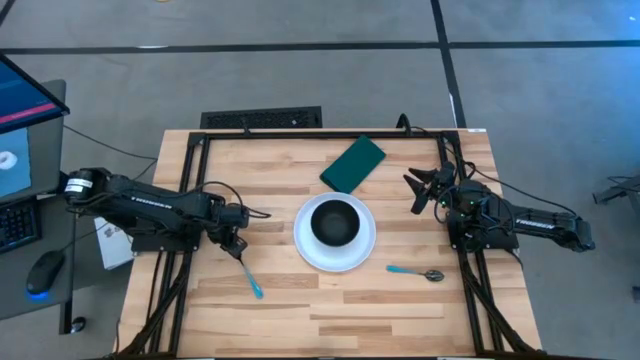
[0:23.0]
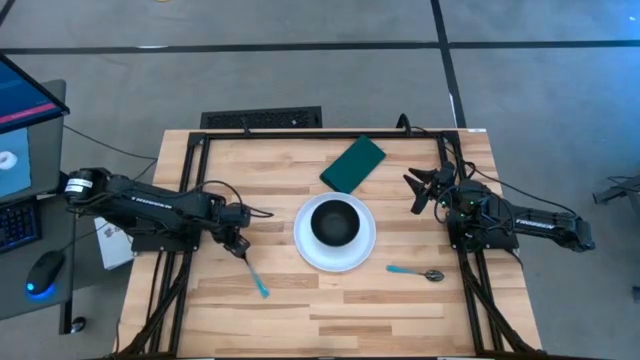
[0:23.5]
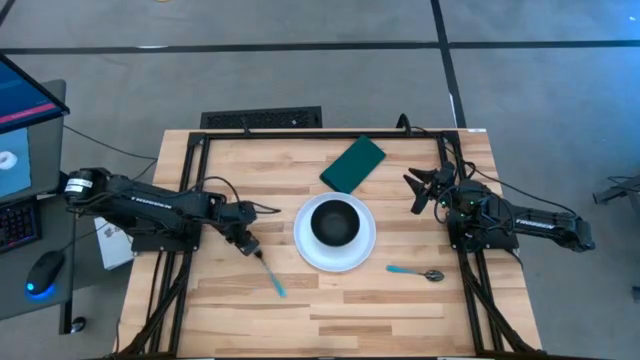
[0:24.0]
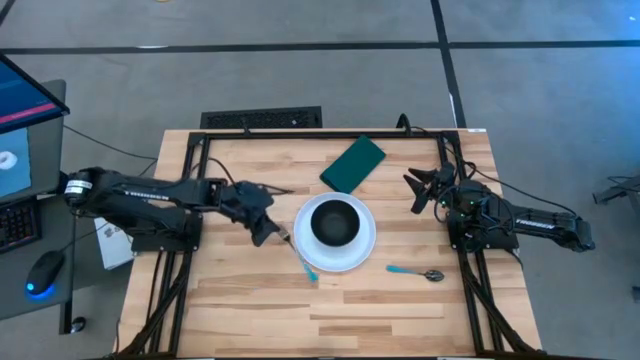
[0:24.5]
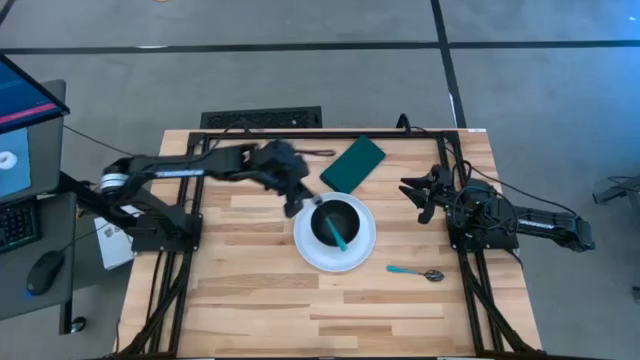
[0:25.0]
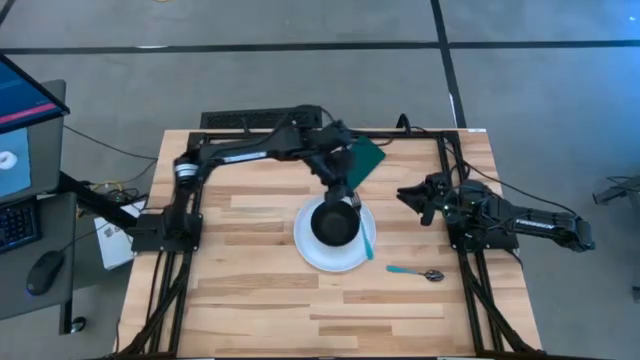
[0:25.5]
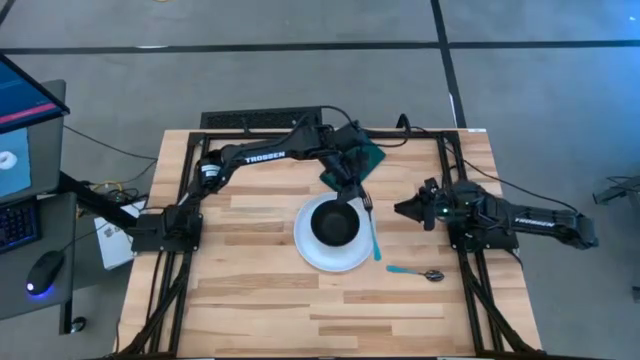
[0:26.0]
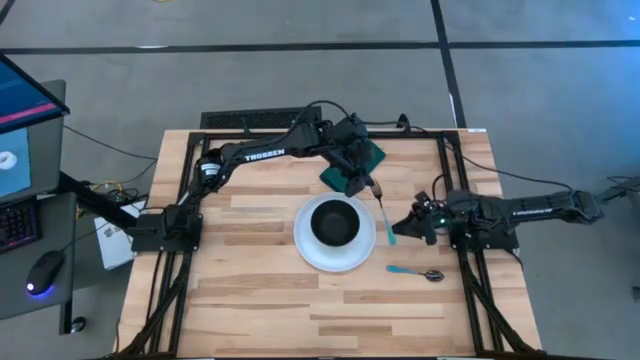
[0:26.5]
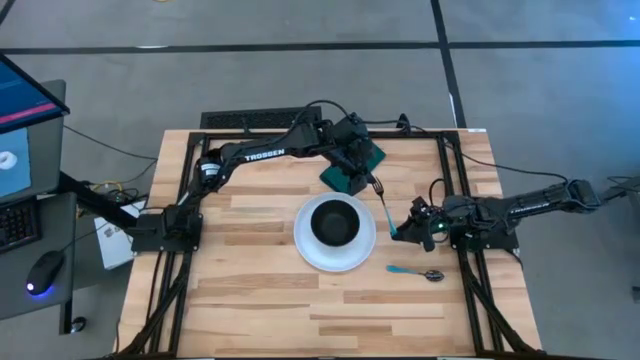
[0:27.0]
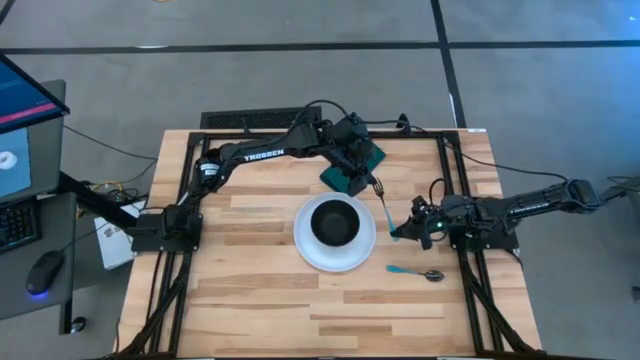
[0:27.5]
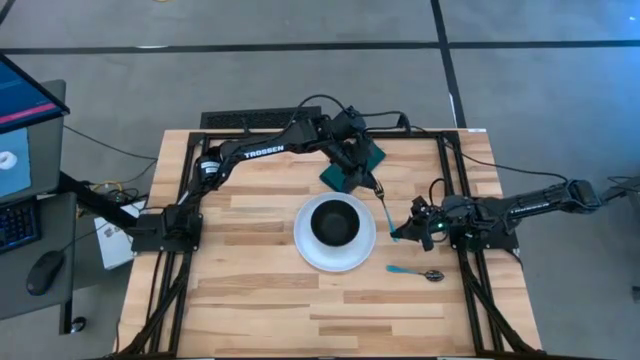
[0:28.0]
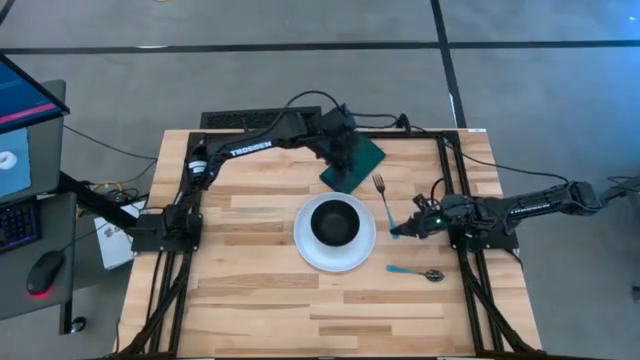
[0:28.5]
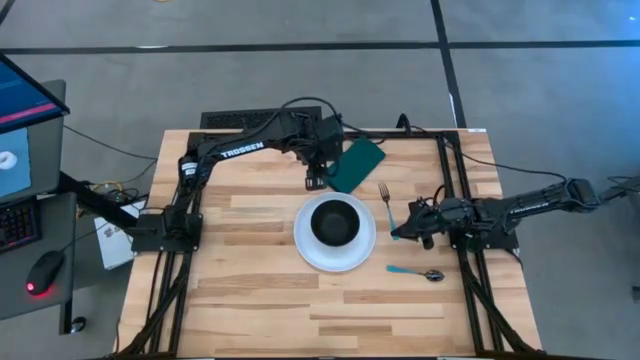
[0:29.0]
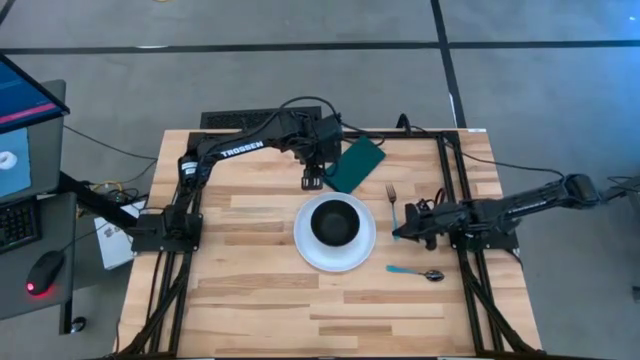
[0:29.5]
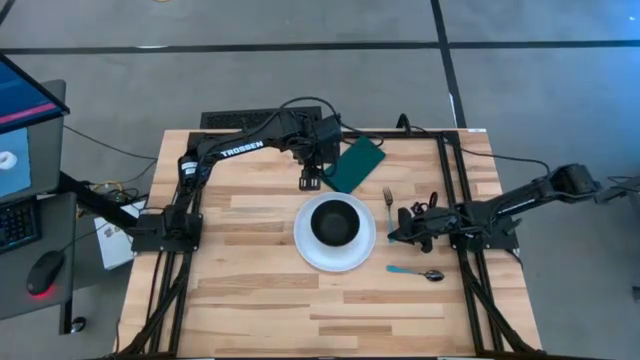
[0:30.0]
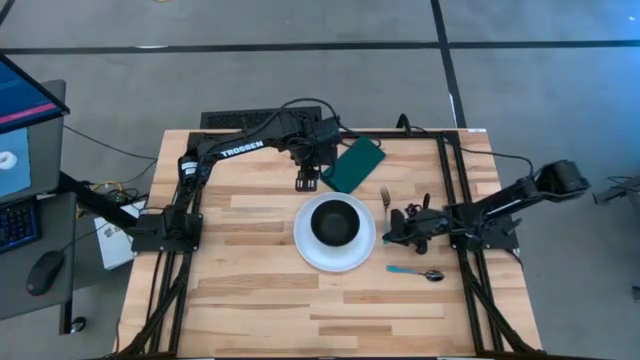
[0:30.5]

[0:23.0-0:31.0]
Task: Set table place
Put the blue fork into the black bowl

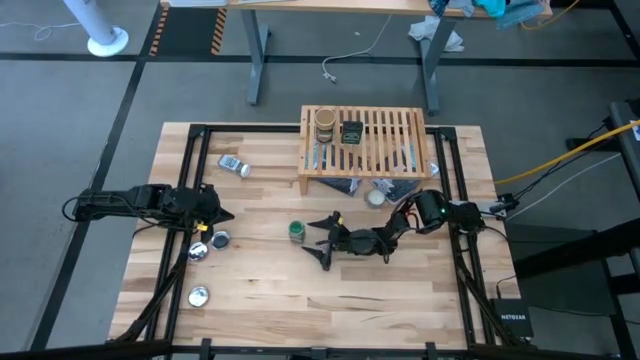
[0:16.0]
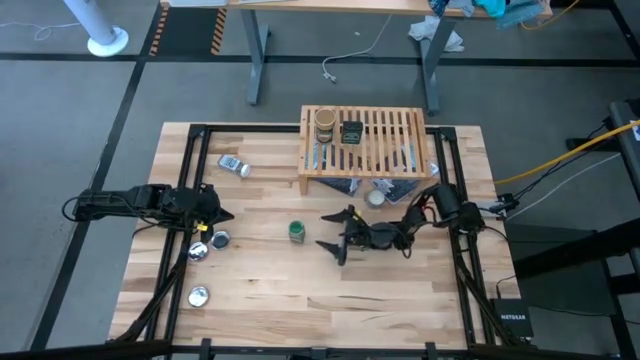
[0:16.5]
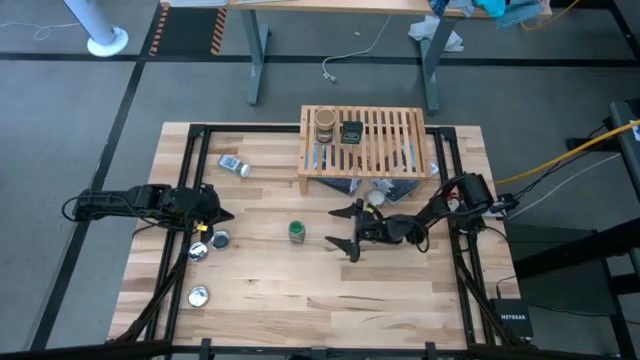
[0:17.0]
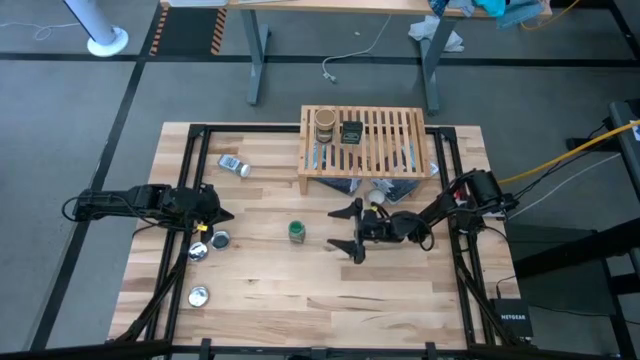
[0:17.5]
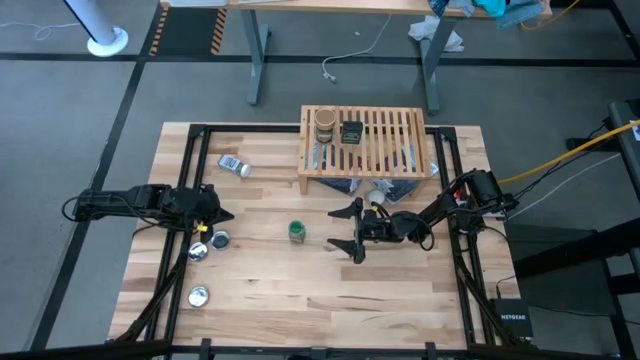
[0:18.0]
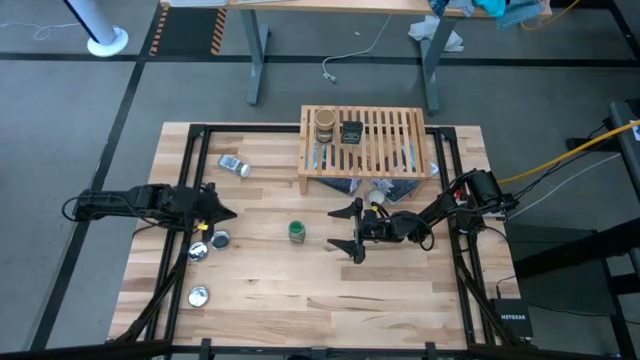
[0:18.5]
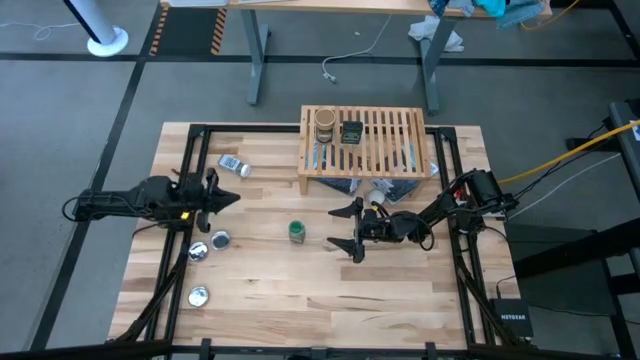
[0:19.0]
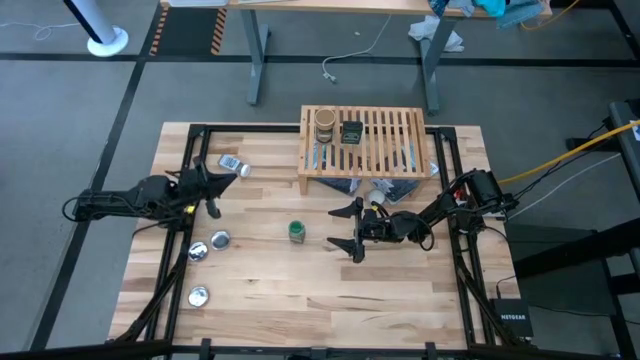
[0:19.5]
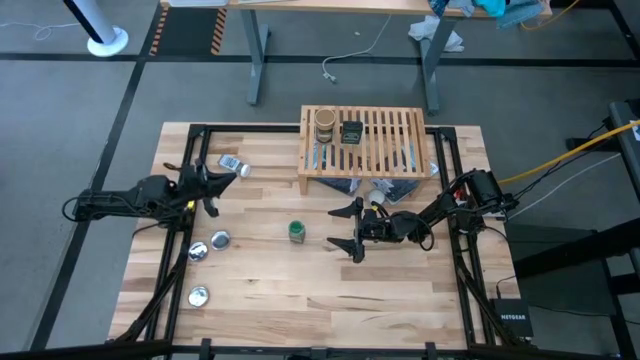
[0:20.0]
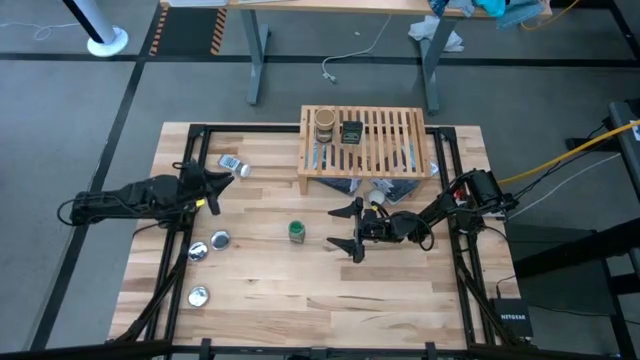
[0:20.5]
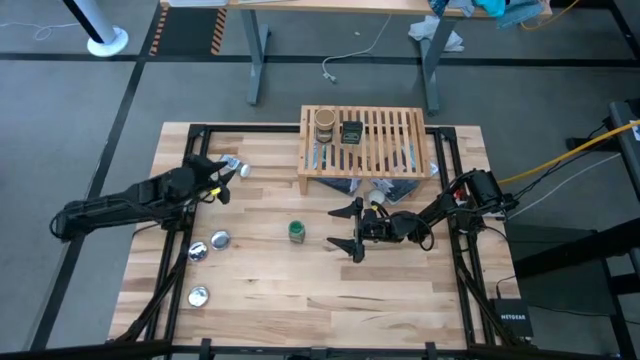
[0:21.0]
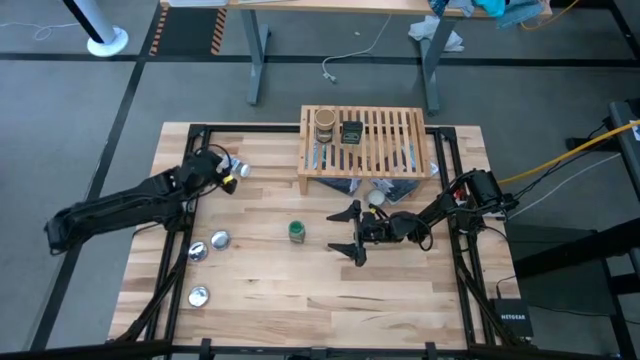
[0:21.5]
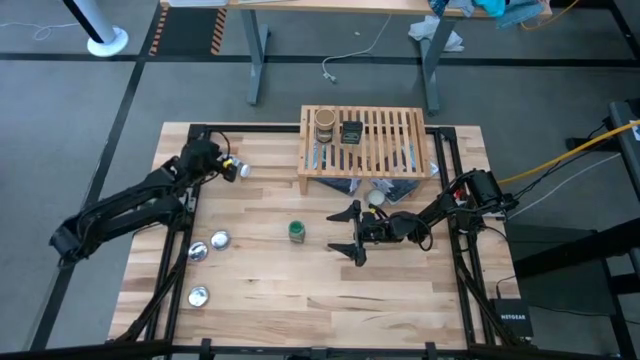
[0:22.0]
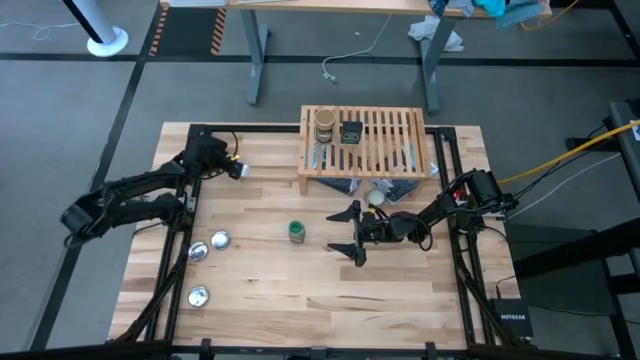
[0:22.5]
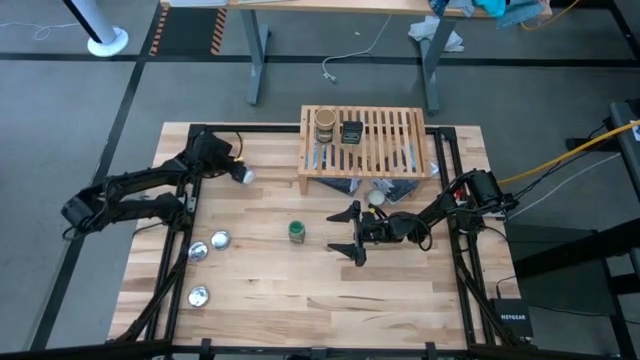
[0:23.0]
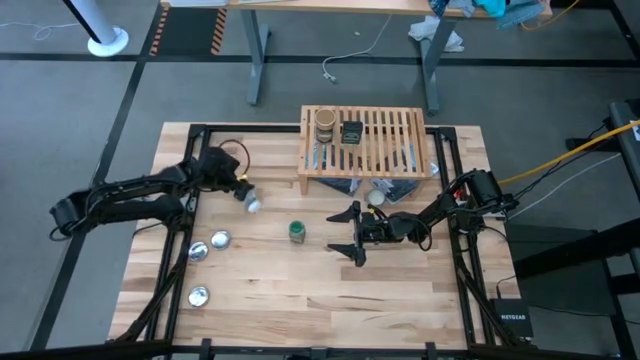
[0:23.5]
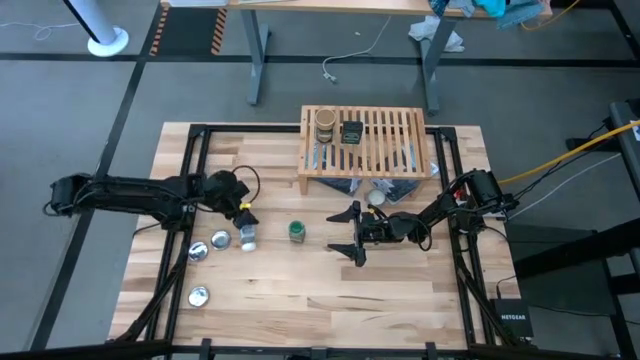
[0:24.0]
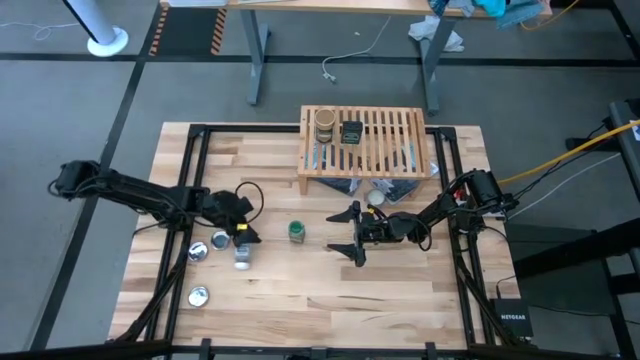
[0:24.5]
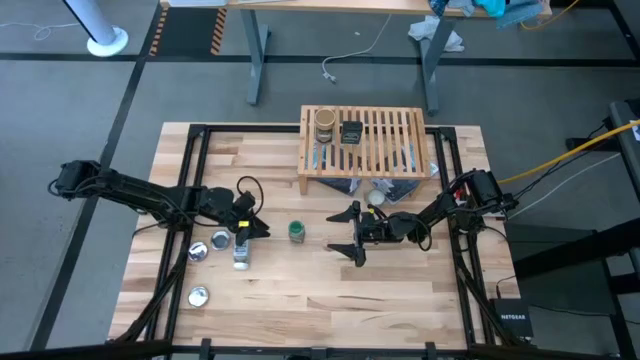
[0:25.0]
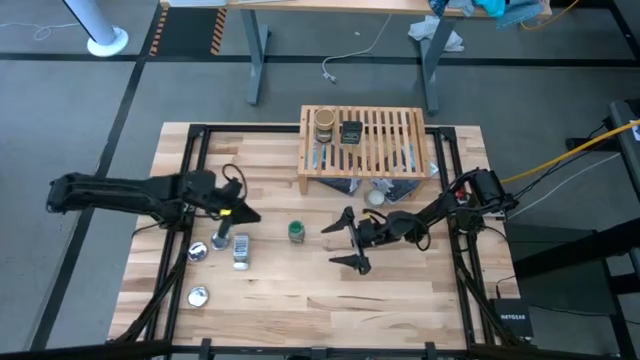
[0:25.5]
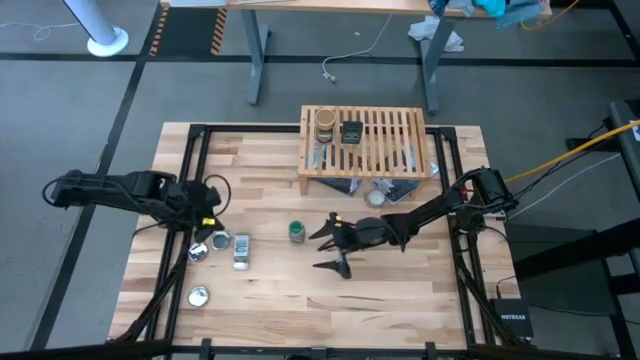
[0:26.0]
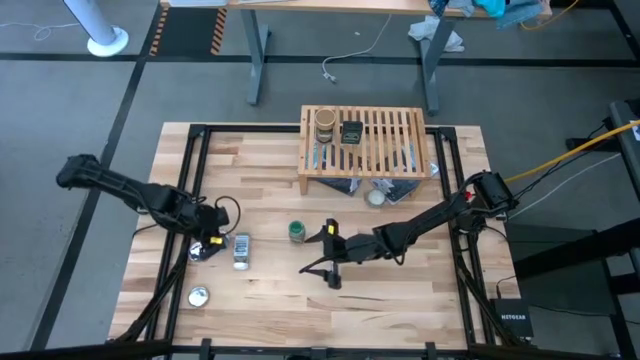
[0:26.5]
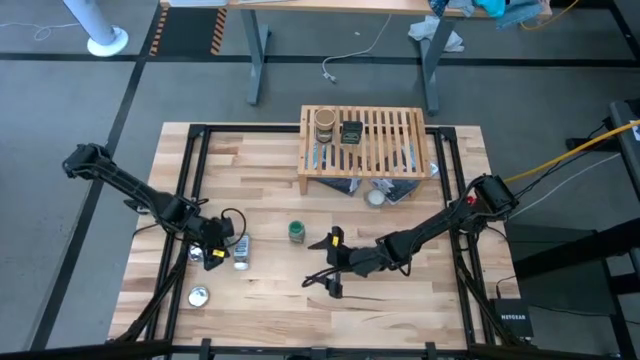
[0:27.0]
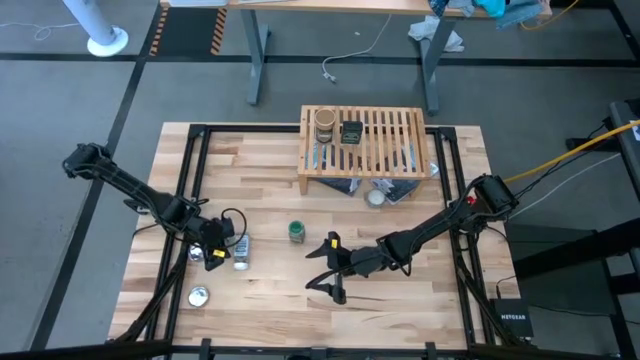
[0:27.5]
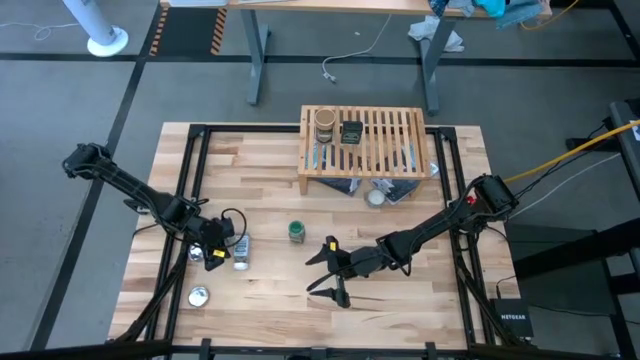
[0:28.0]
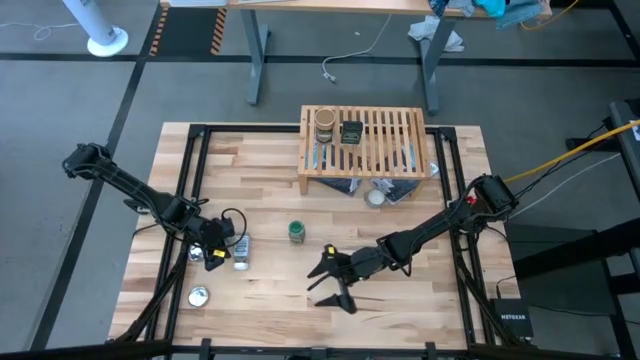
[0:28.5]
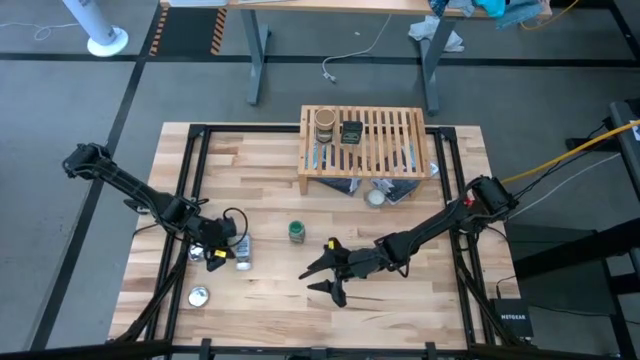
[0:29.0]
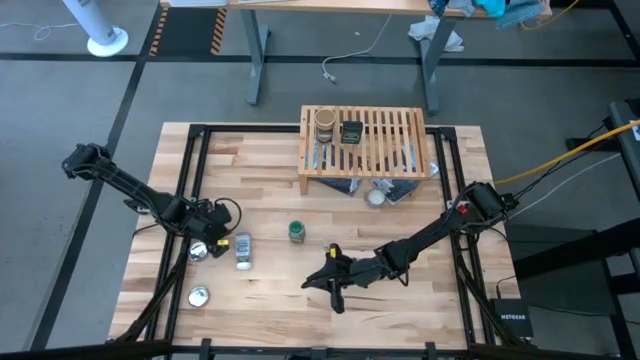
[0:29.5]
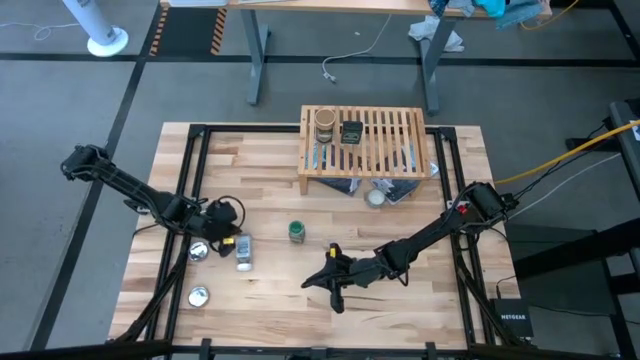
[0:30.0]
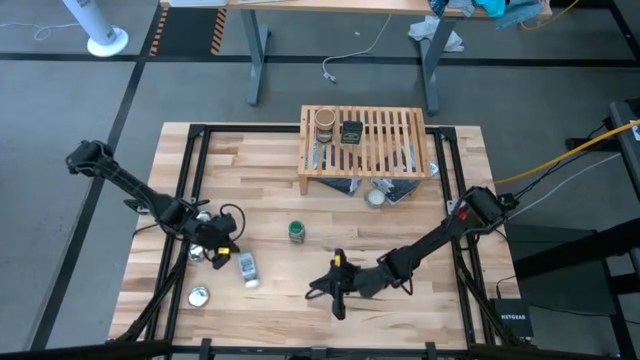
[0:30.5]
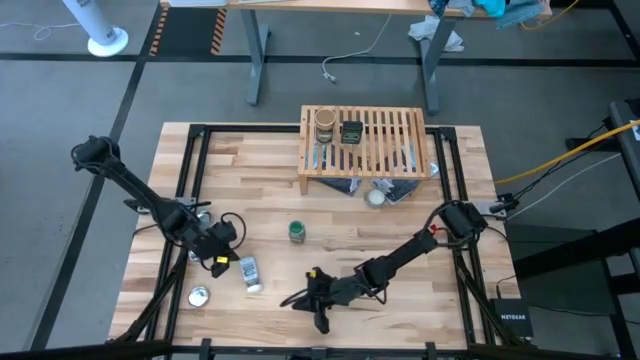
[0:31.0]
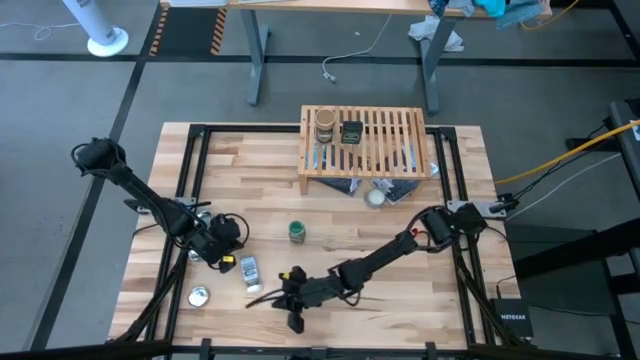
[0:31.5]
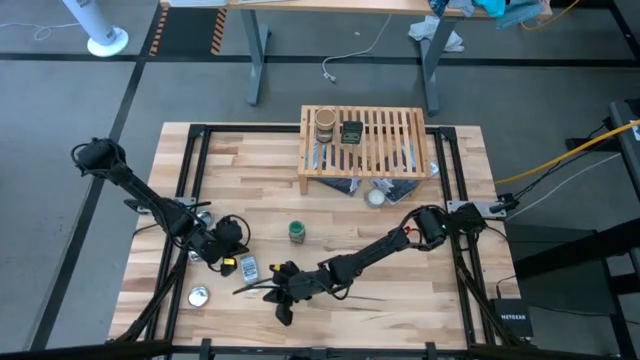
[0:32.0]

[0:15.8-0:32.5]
Task: Shelf spices
Move the white seasoning bottle to the middle left of the table
